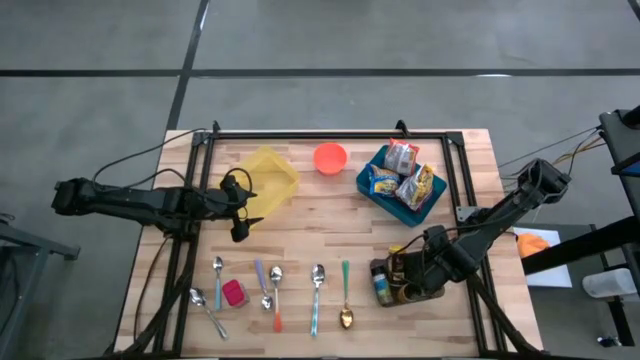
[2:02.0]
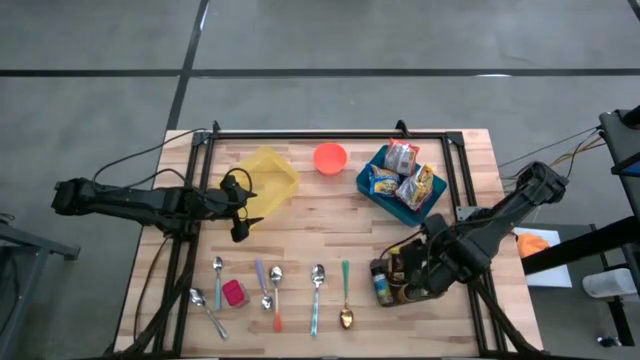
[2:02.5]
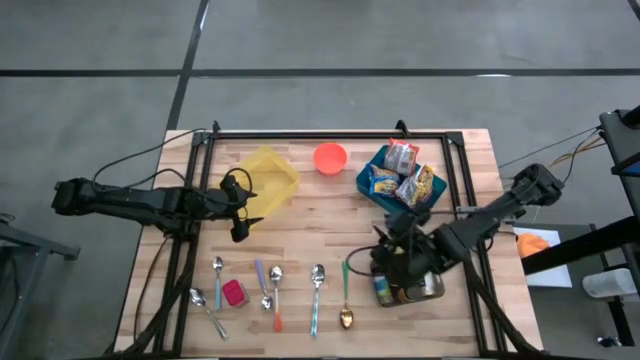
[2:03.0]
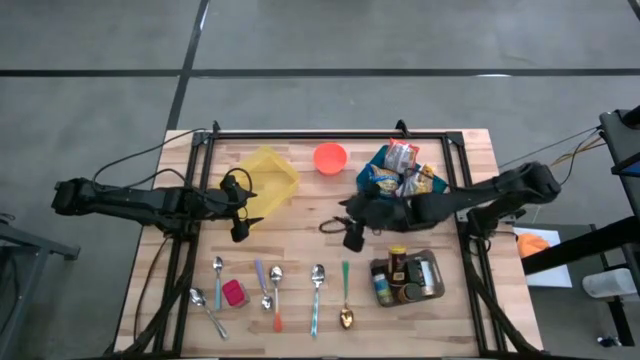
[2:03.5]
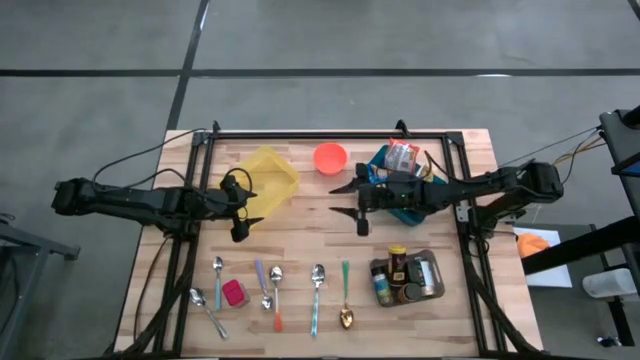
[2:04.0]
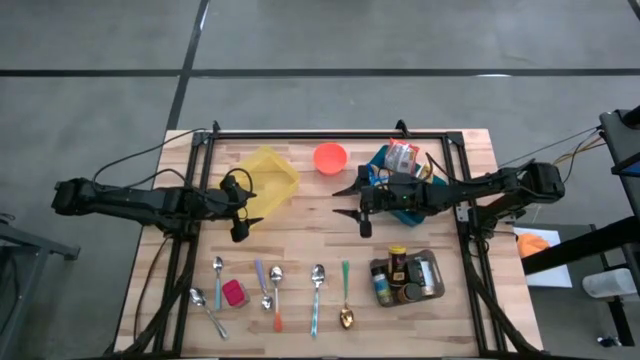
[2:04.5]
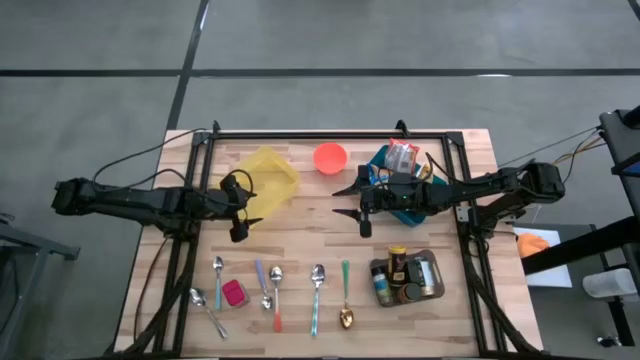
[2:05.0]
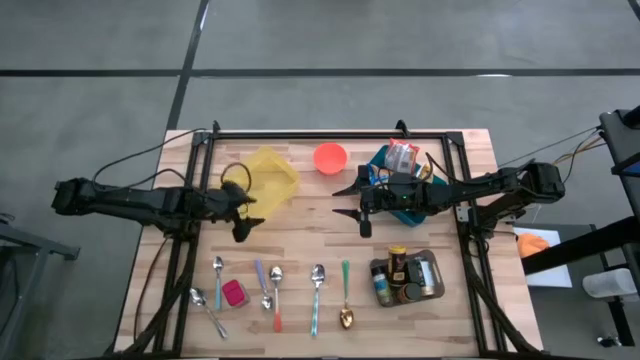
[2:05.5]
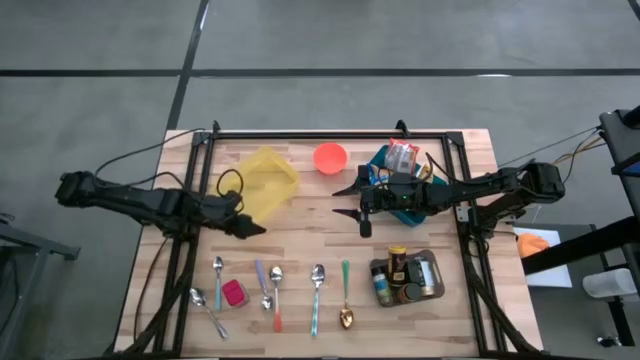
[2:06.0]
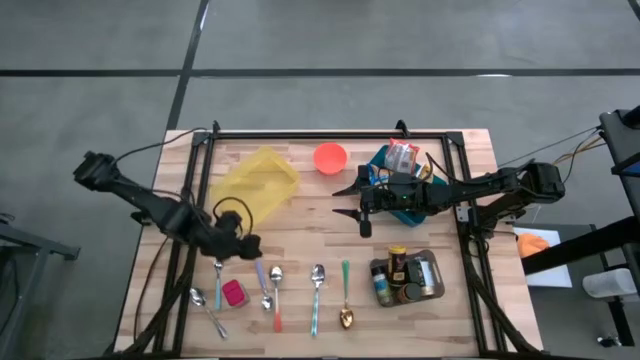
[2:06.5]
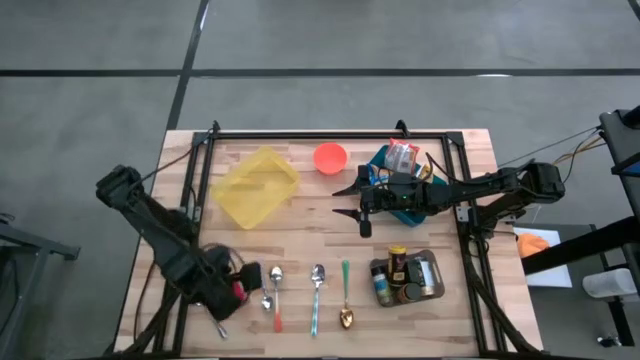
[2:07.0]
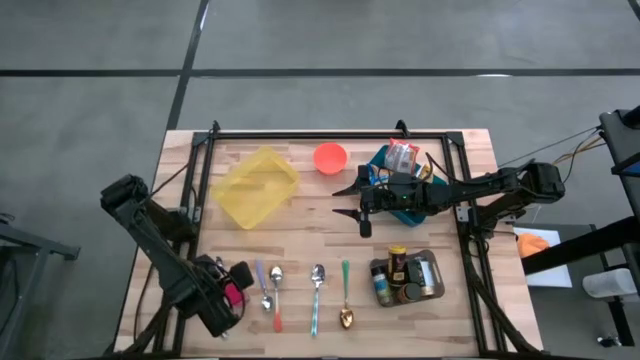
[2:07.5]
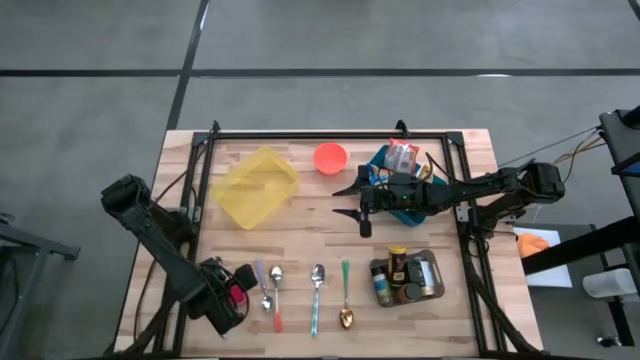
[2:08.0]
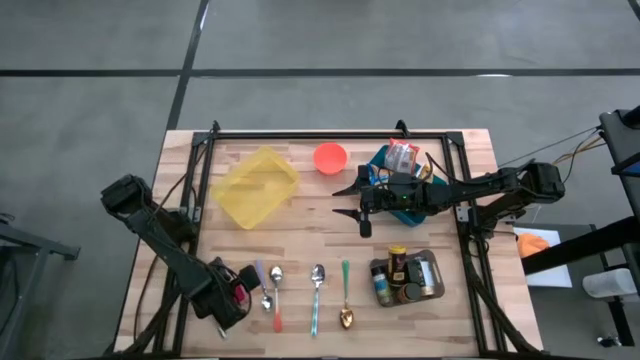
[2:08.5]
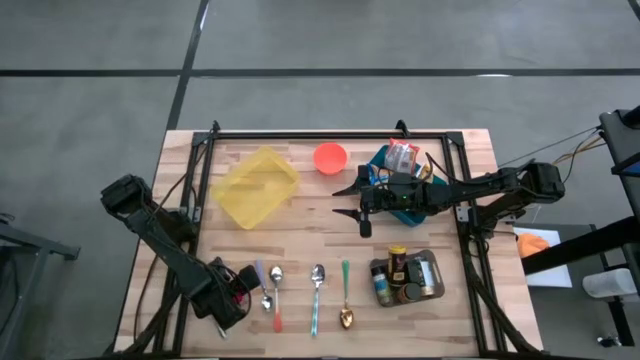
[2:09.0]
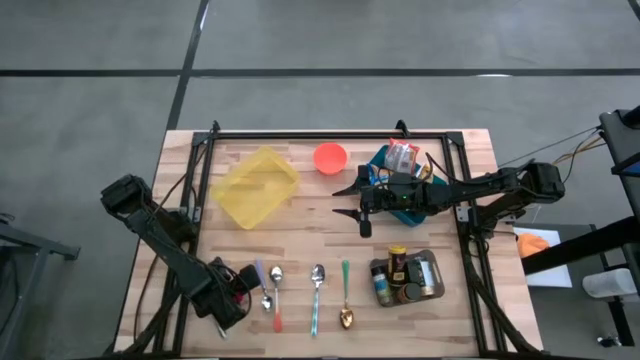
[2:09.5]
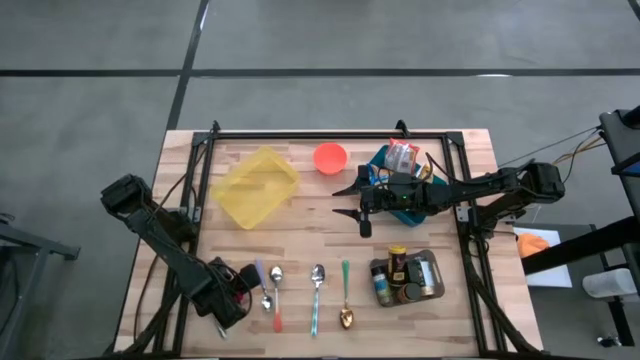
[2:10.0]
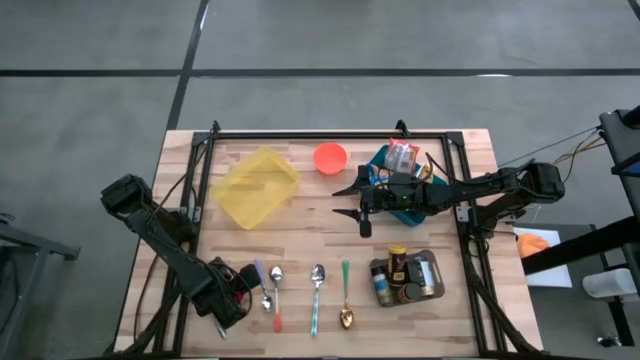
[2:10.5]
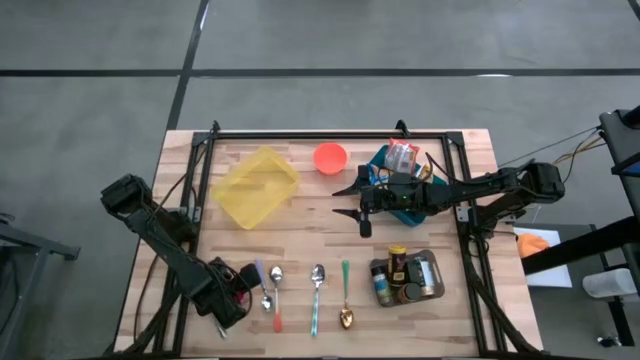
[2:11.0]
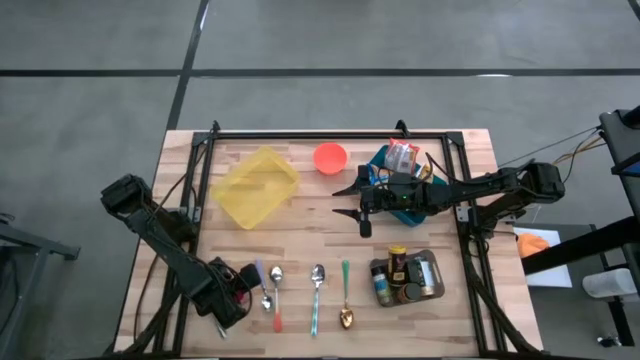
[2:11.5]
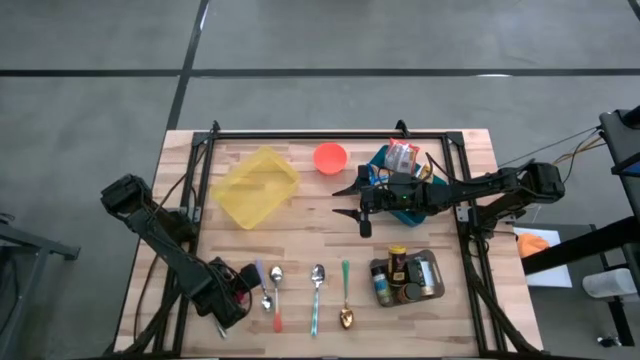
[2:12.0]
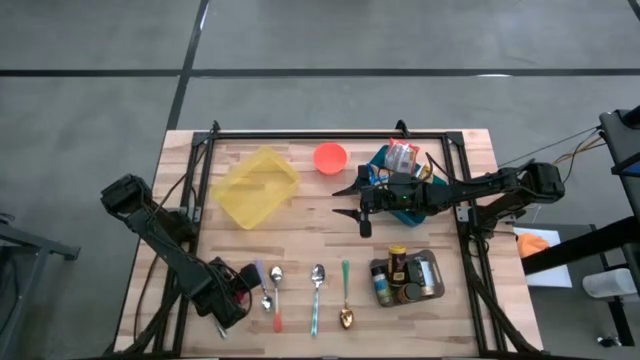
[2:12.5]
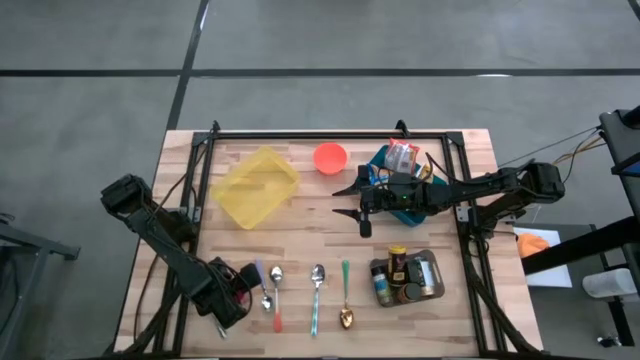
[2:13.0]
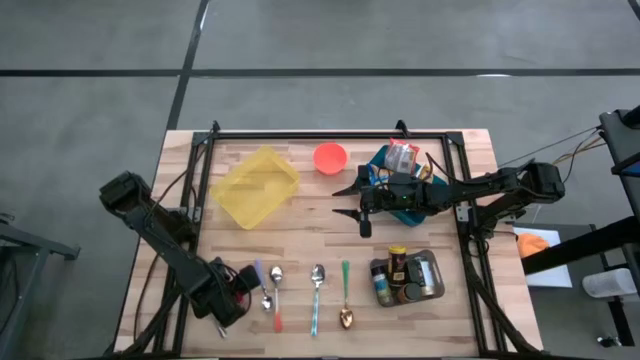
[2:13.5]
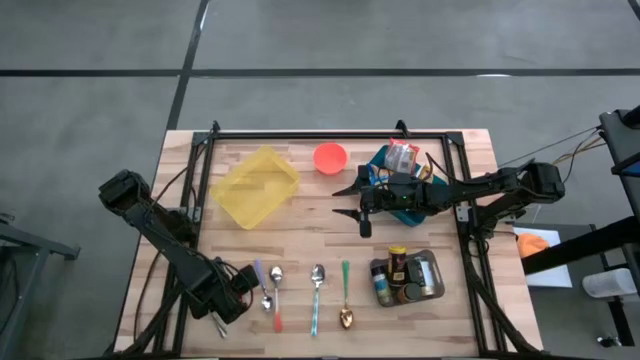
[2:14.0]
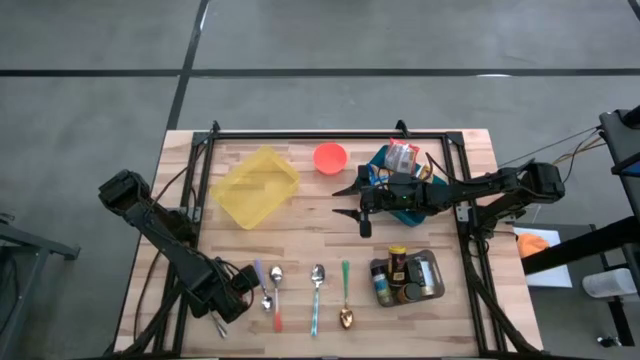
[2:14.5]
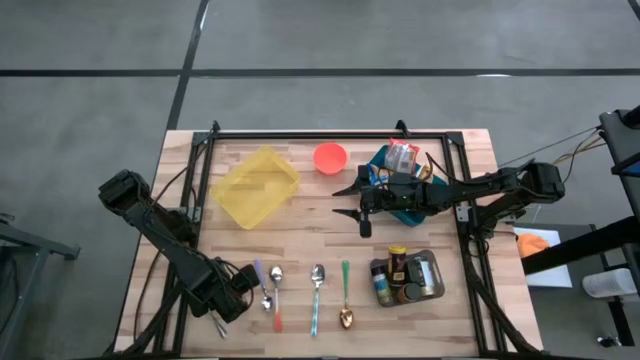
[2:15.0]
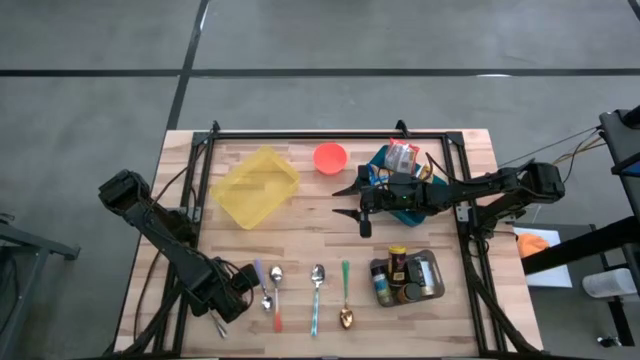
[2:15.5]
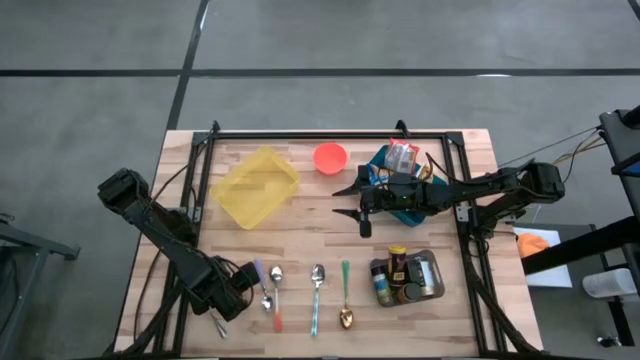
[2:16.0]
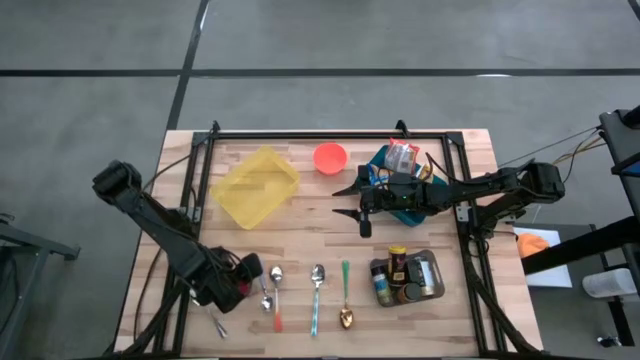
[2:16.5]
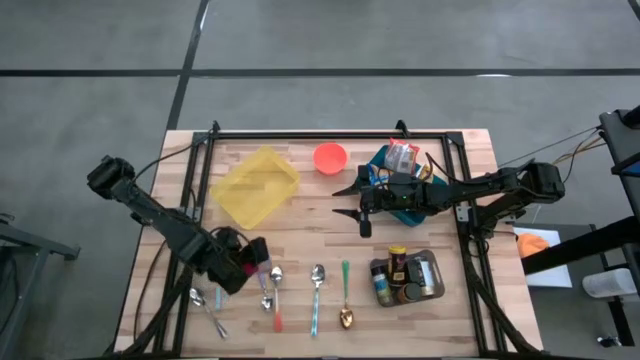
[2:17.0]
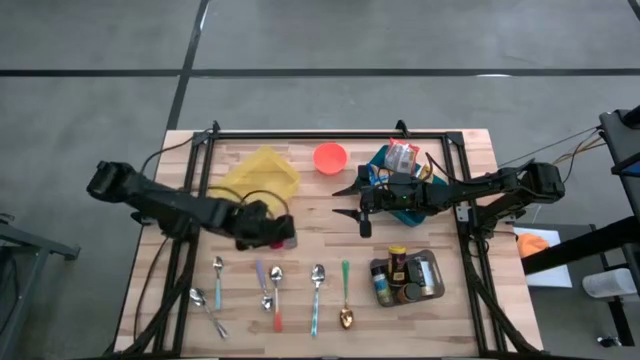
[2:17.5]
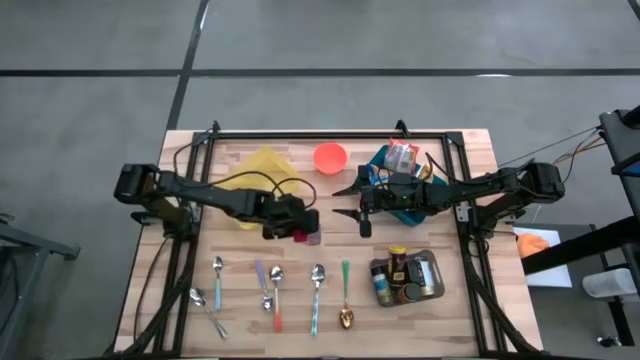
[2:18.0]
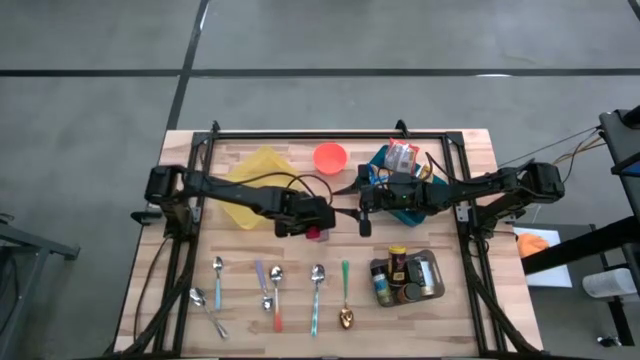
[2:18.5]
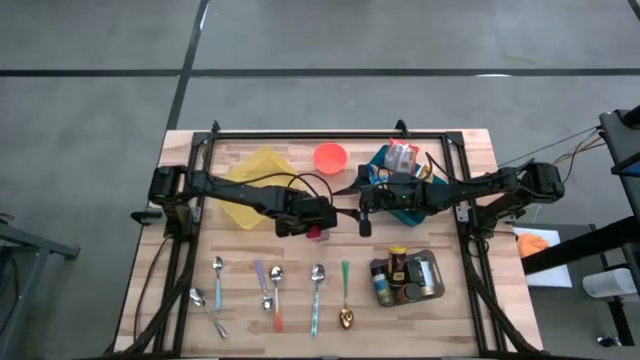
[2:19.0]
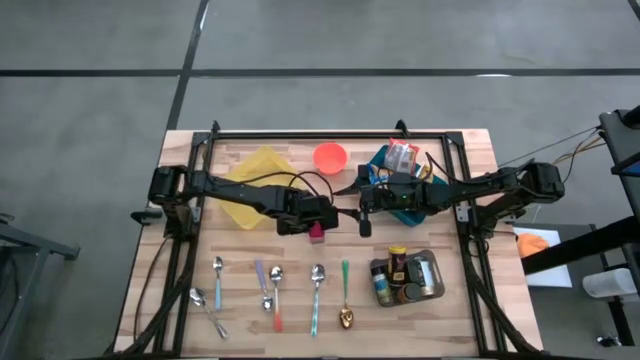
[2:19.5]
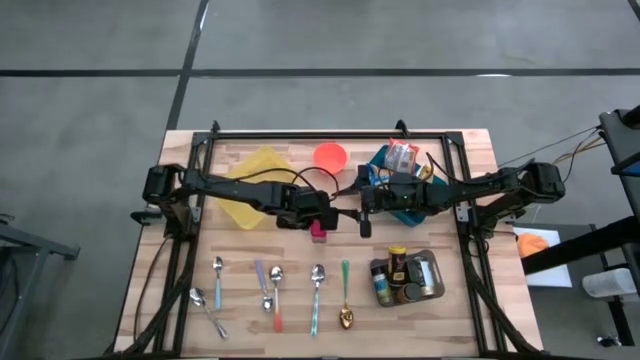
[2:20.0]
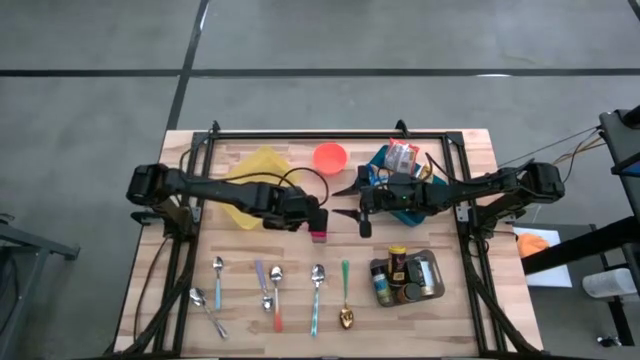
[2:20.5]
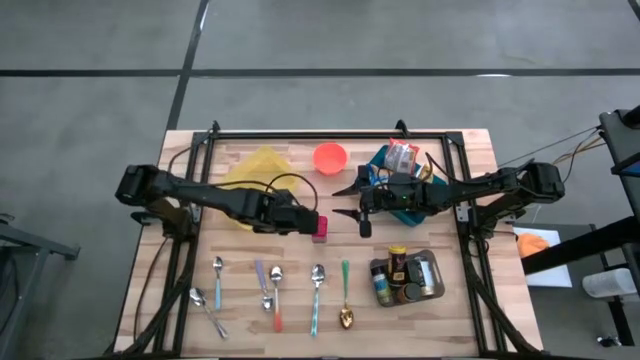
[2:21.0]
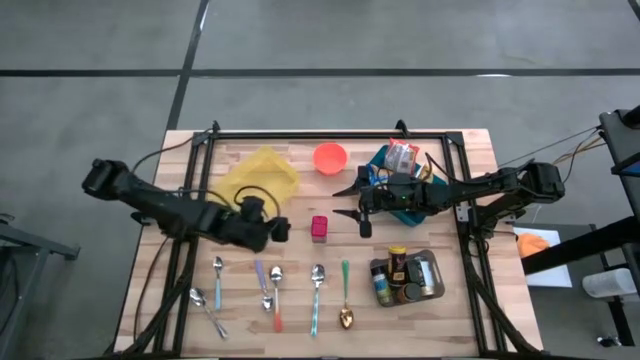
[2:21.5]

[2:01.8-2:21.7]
Put the red seasoning can into the black bin
